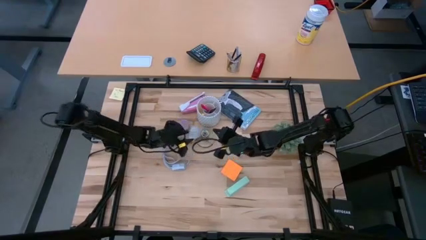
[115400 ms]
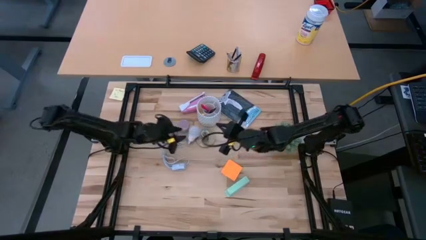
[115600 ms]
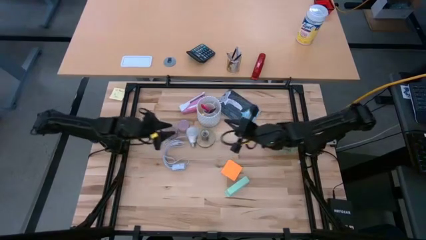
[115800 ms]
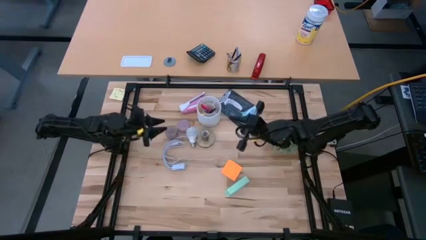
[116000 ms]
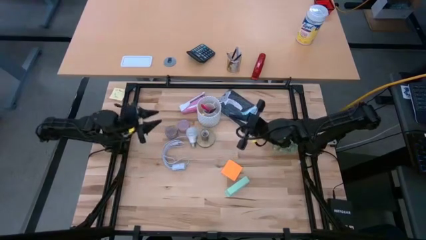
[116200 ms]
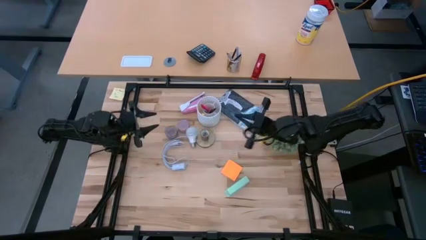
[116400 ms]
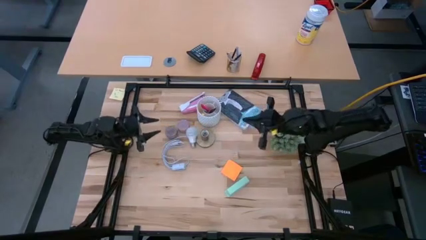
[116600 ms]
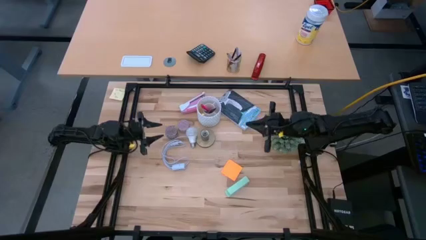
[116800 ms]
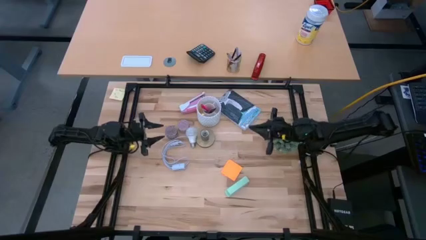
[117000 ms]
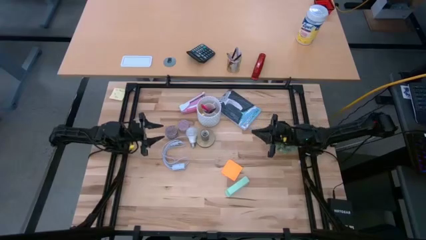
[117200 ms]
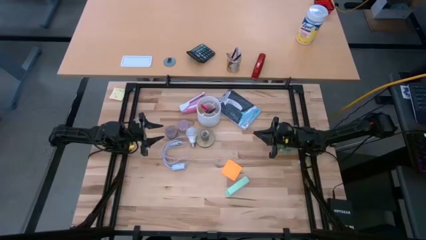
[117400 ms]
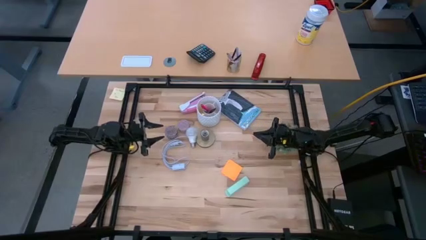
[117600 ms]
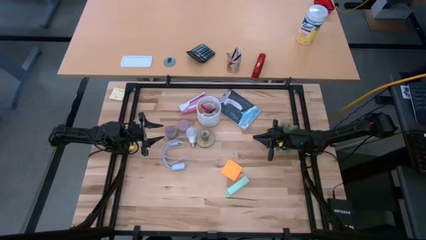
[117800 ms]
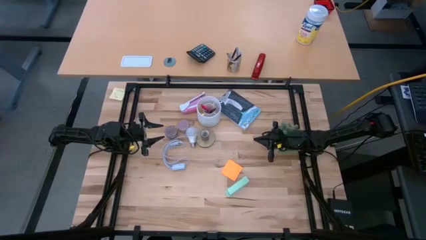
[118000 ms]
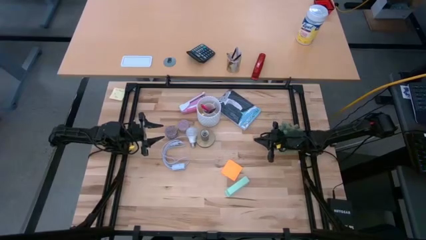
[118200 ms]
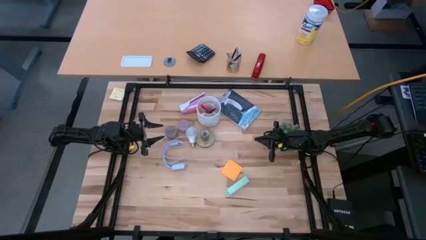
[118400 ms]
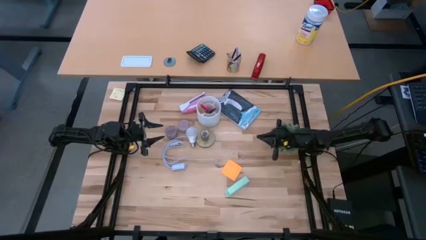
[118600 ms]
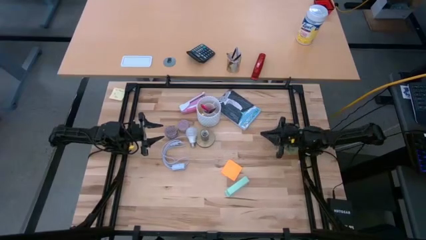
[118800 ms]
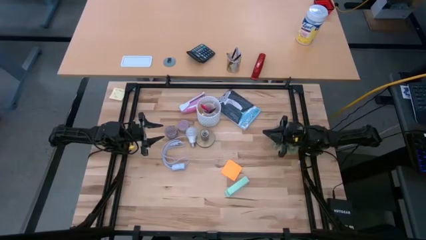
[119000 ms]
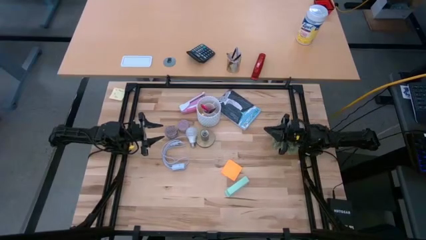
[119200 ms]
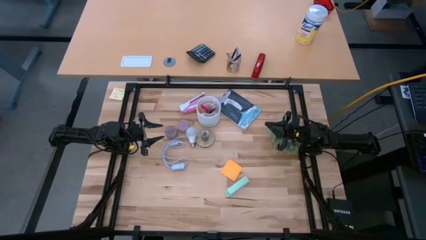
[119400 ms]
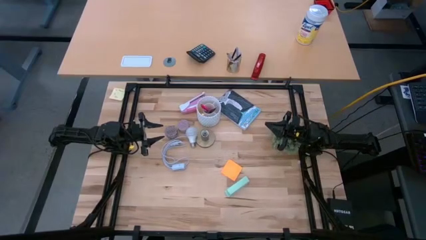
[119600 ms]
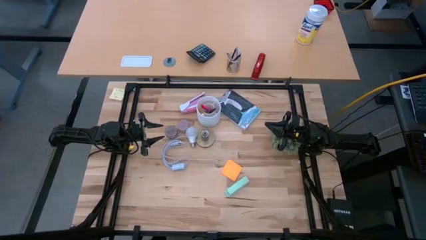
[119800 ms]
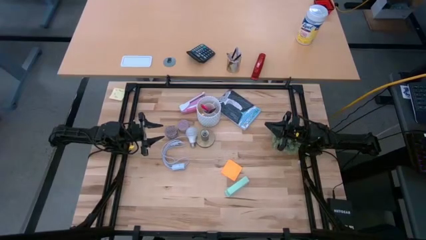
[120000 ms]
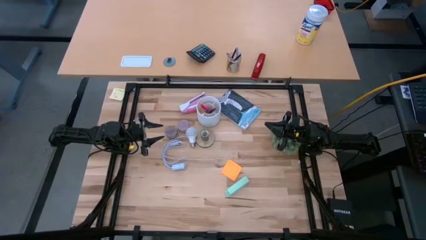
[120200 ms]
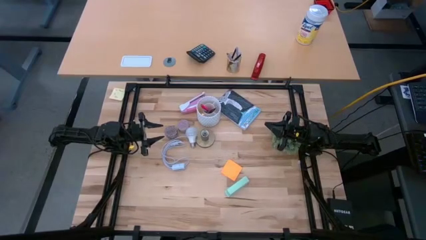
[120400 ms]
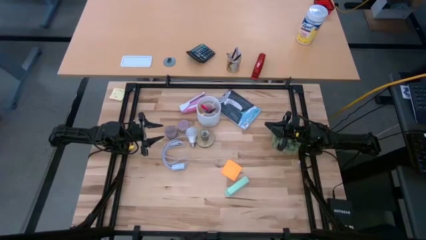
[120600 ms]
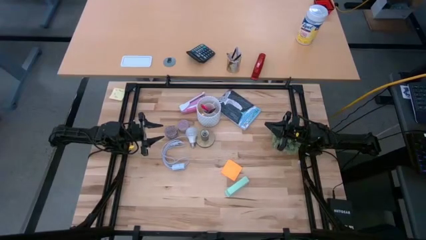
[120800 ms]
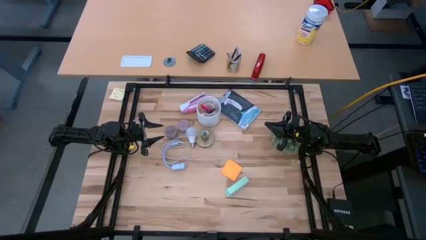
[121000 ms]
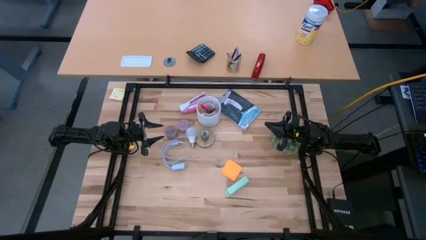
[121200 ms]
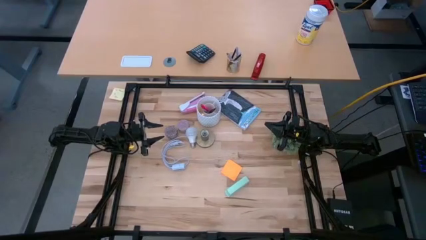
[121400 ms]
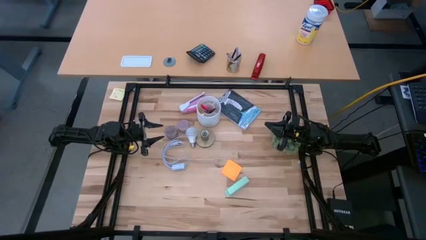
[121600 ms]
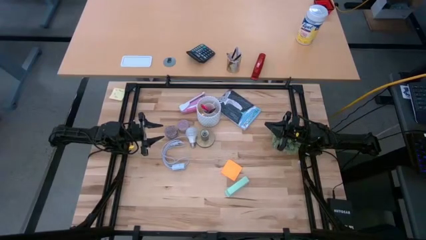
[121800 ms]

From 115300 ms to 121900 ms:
Task: Screw lightbulb
Return to Home Position

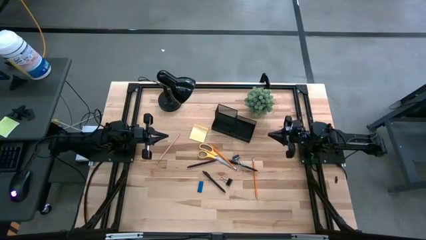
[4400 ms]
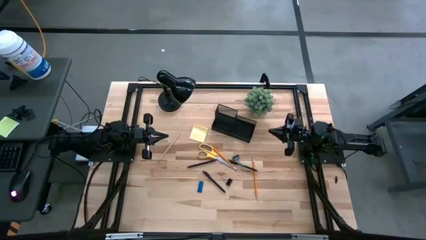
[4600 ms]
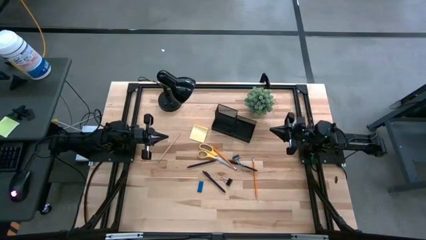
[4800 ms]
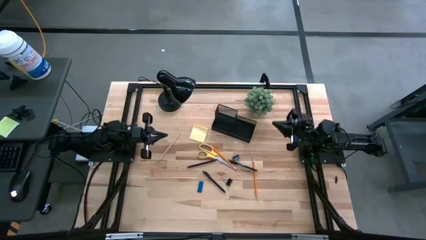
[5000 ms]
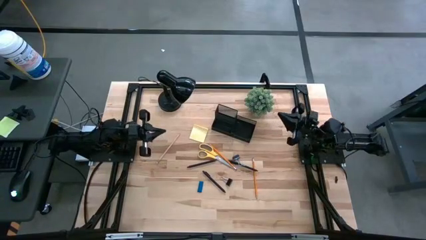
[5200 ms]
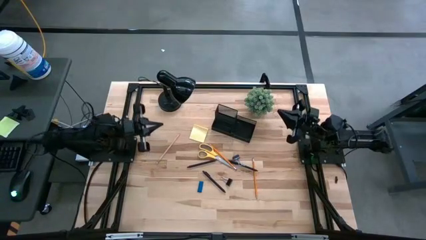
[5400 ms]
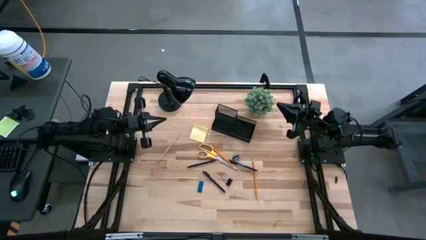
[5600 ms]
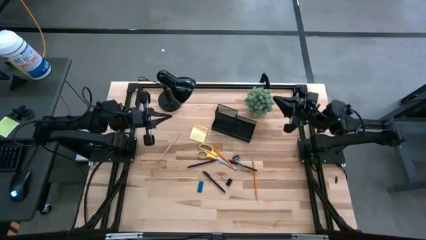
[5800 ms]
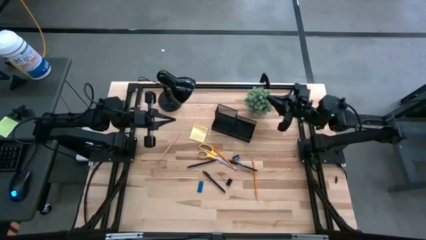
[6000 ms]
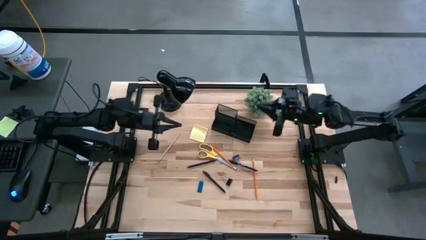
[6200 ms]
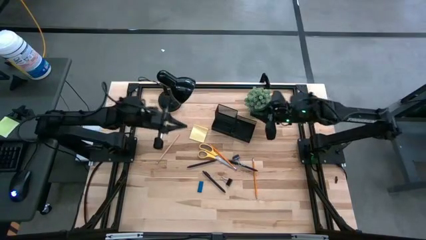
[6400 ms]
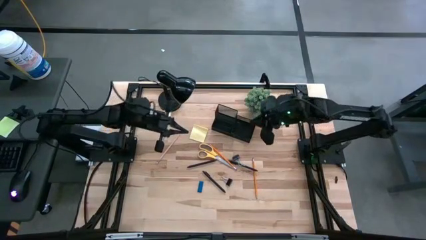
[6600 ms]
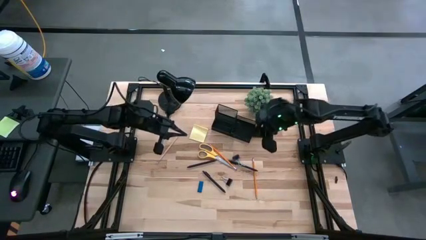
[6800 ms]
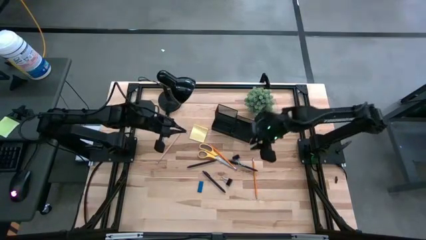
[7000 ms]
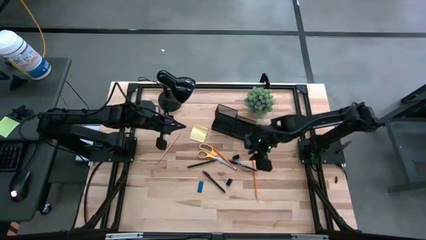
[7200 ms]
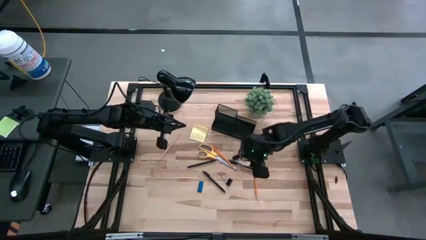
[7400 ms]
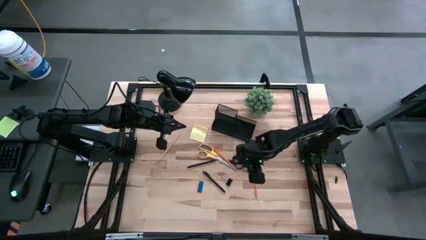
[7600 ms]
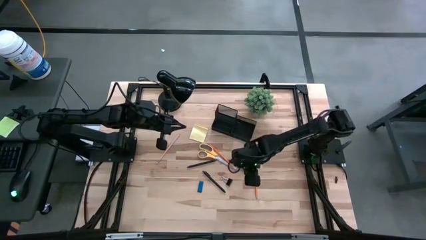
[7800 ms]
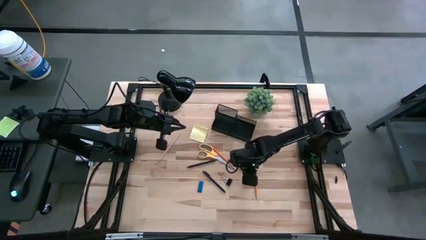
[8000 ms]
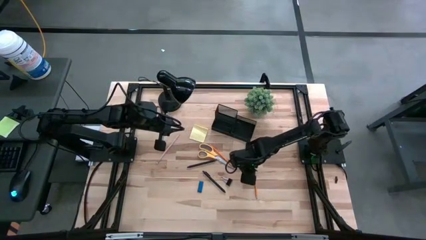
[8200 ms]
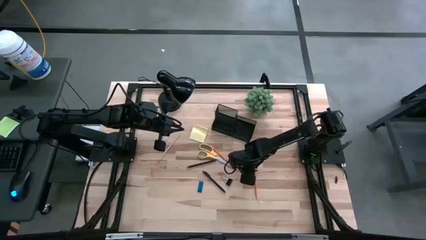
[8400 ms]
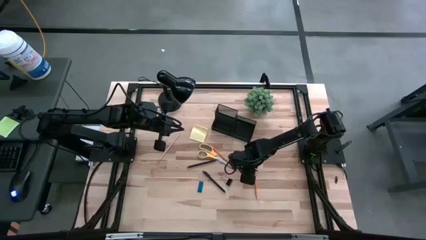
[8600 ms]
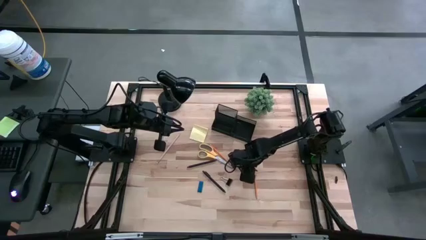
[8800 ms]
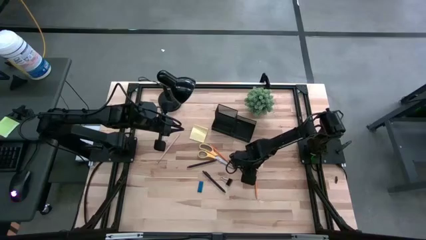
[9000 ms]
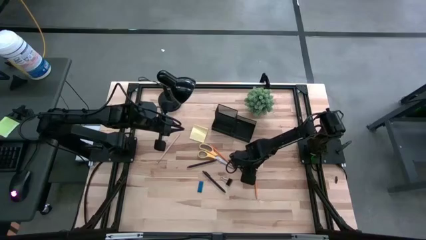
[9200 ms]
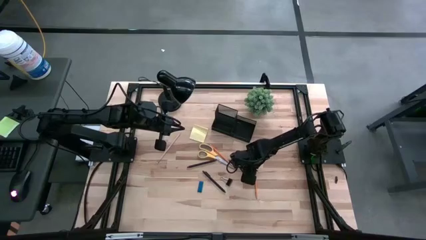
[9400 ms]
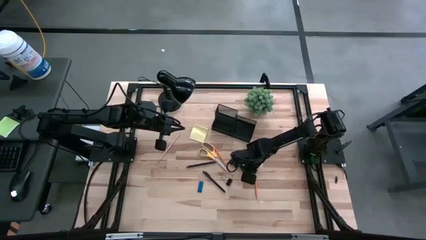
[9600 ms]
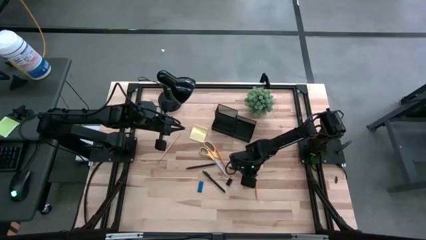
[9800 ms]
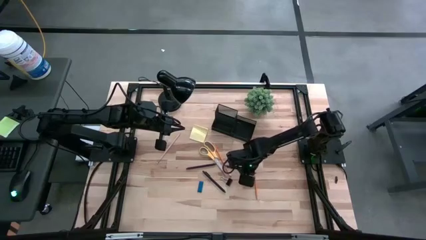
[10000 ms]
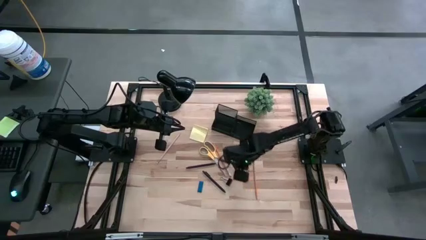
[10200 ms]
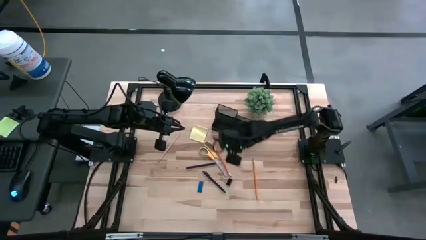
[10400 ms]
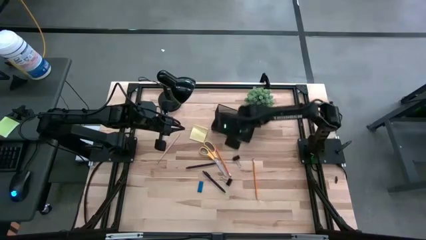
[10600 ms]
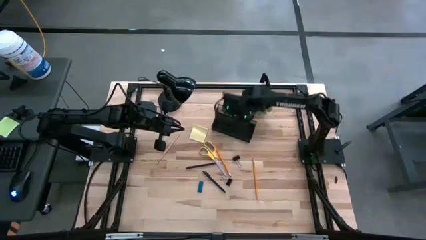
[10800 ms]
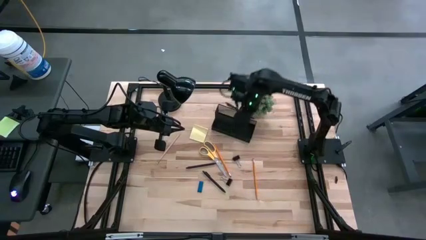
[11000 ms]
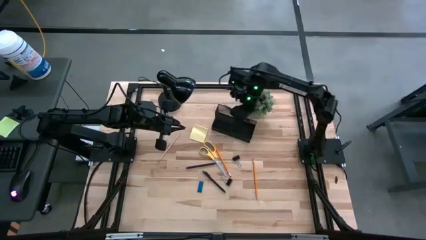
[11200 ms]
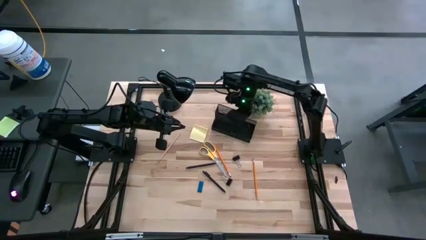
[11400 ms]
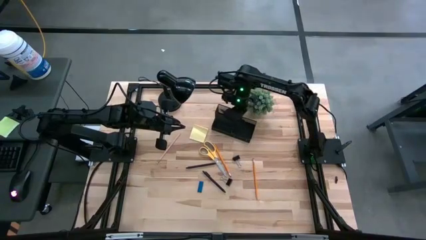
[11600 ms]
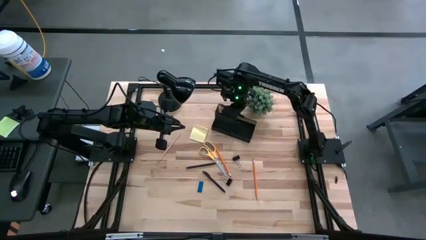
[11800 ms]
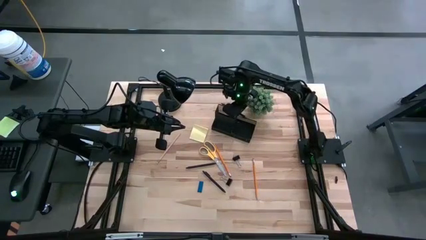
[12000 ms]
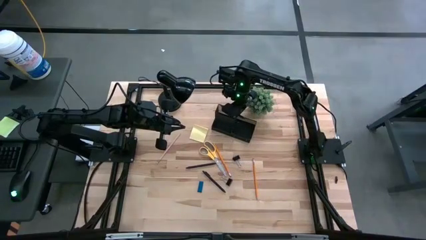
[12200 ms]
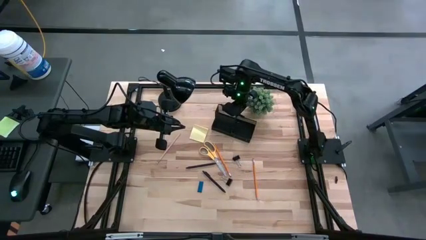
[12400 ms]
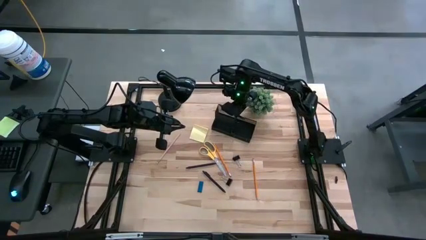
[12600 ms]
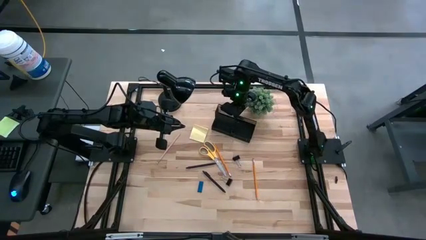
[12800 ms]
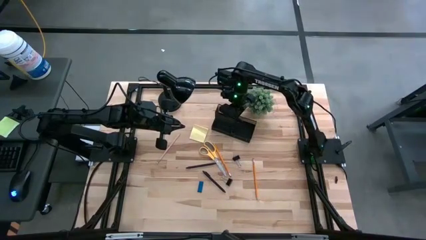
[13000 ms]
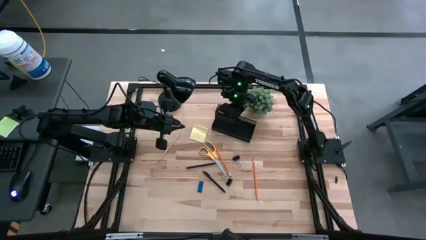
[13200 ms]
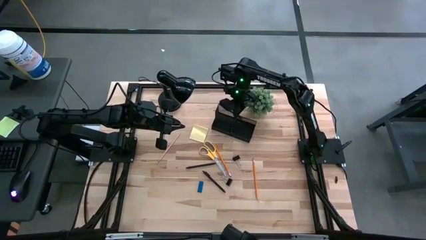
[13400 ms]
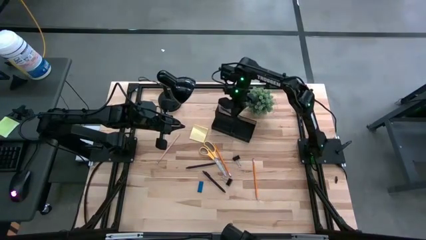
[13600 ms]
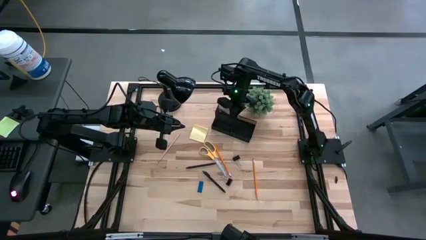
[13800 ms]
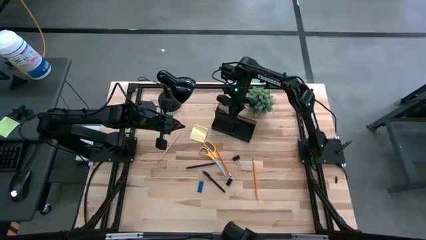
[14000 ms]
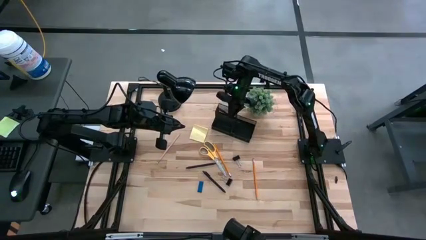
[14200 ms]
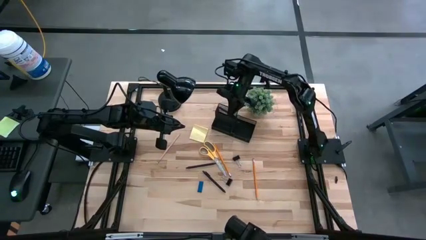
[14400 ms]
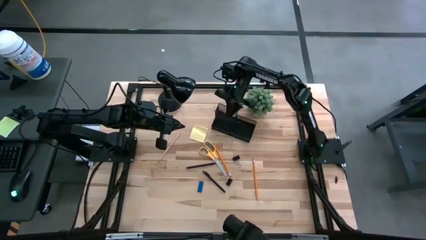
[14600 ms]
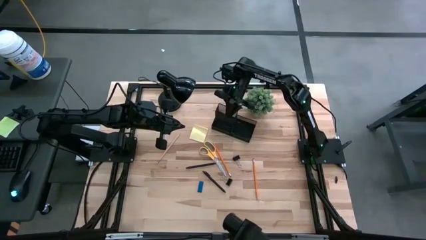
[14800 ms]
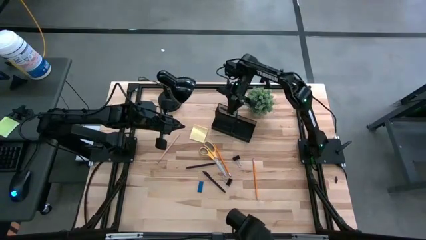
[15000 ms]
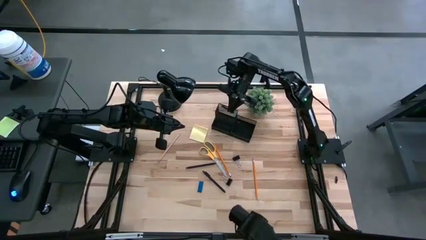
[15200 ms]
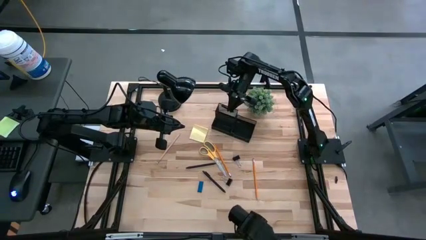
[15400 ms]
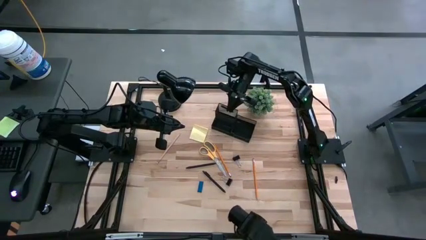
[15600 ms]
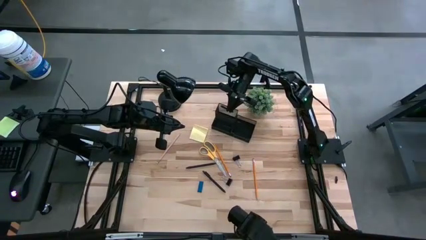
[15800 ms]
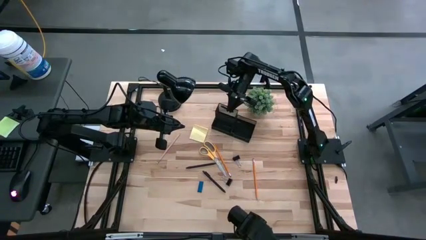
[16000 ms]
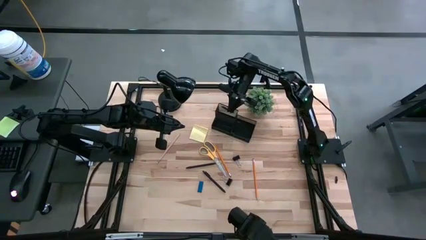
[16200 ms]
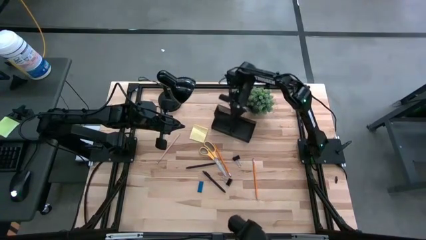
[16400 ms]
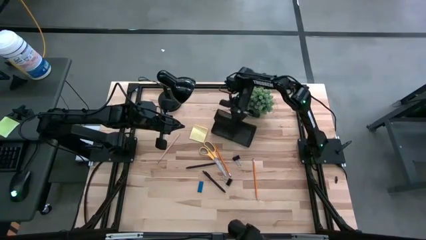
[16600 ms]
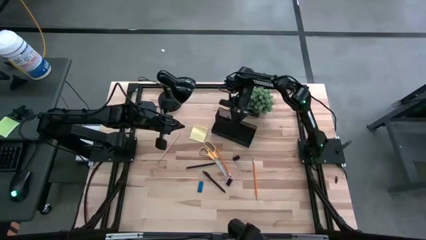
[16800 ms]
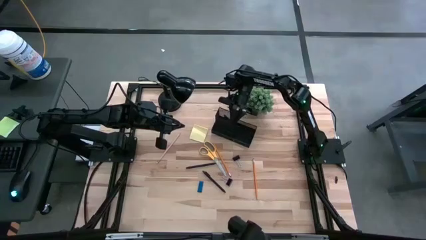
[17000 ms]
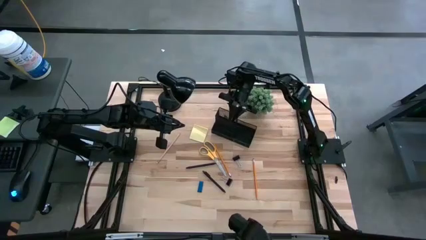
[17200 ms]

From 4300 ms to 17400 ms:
Task: Pick and place office supplies into organizer
Put the right pen into the desk organizer
